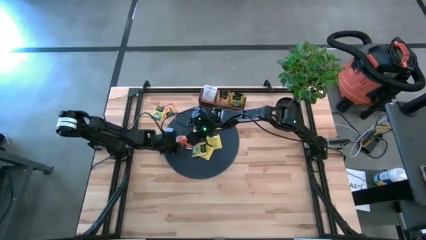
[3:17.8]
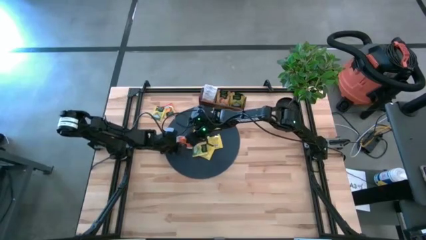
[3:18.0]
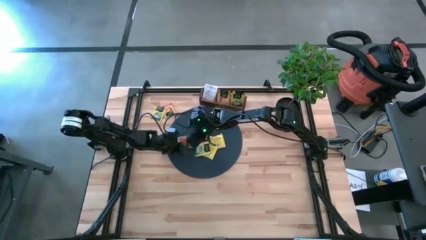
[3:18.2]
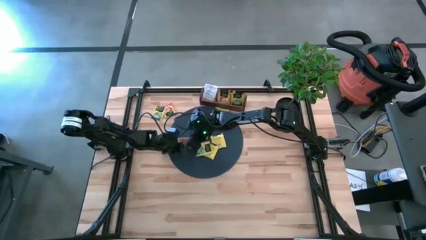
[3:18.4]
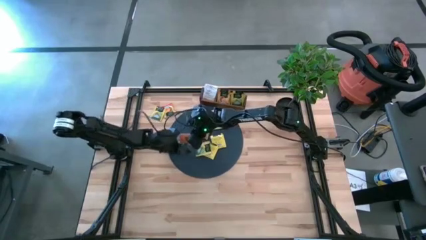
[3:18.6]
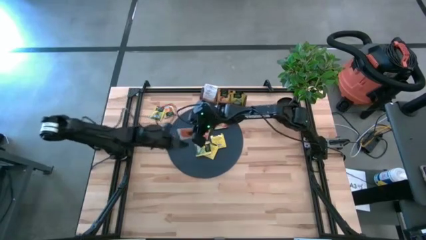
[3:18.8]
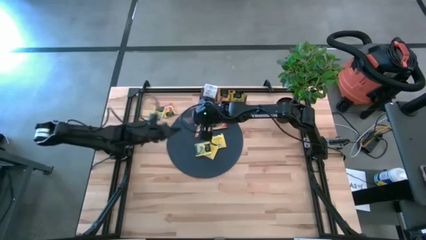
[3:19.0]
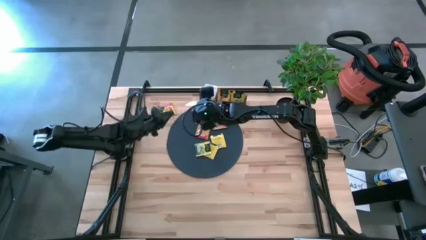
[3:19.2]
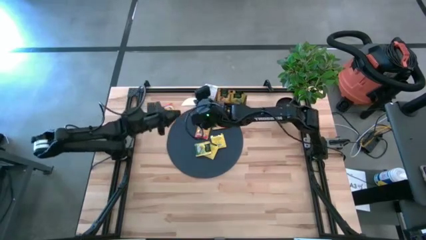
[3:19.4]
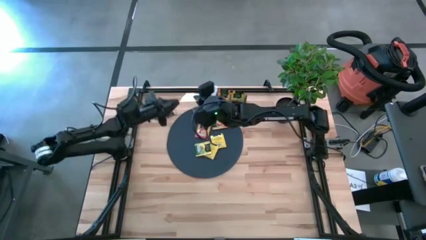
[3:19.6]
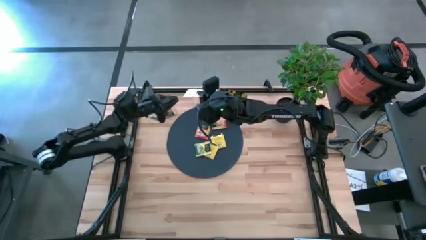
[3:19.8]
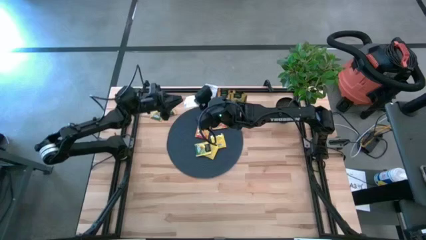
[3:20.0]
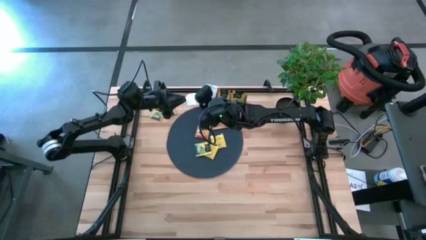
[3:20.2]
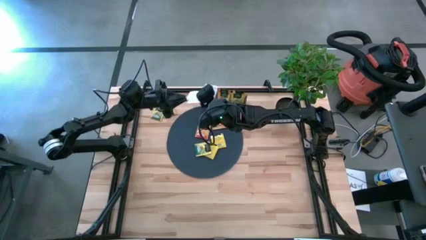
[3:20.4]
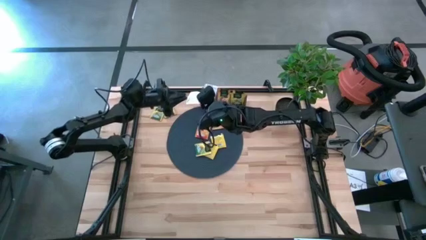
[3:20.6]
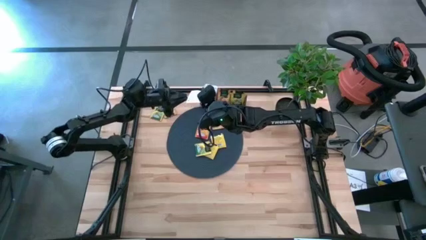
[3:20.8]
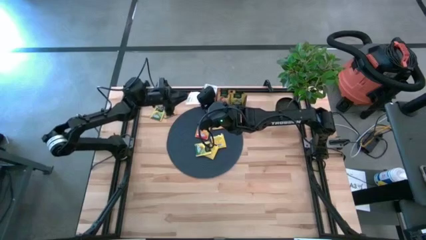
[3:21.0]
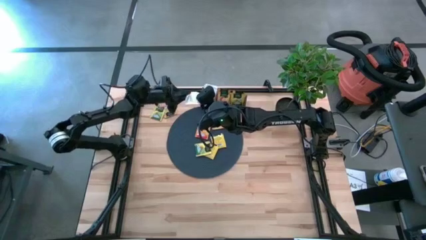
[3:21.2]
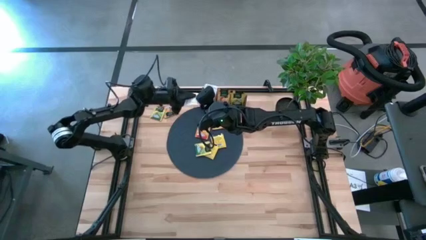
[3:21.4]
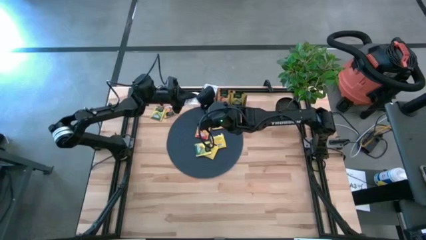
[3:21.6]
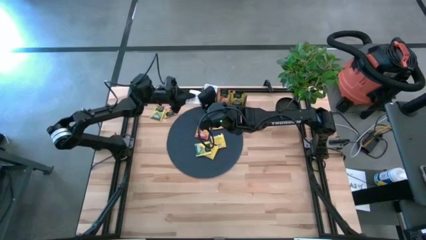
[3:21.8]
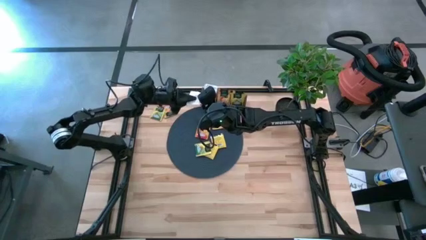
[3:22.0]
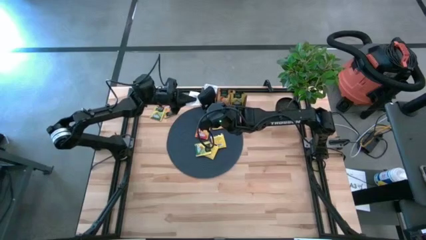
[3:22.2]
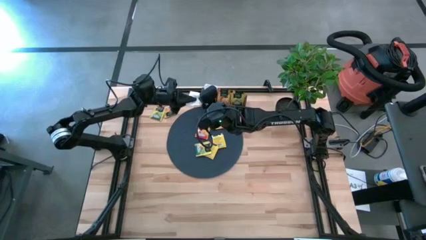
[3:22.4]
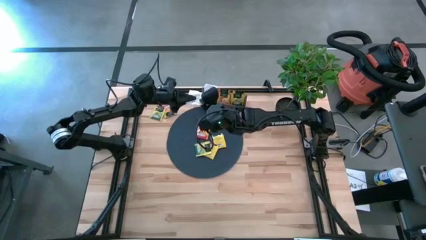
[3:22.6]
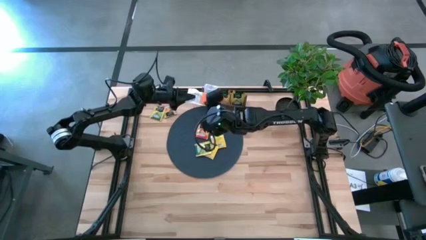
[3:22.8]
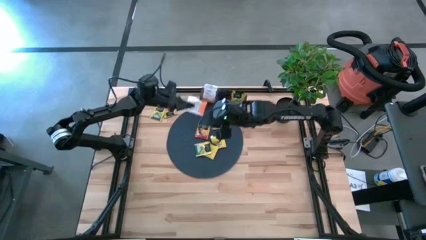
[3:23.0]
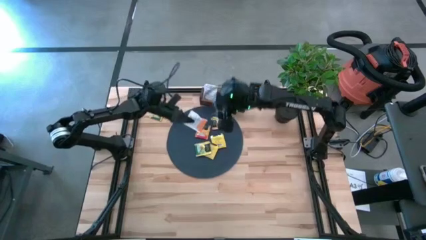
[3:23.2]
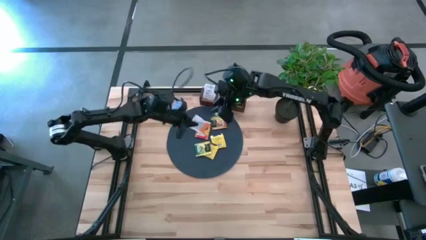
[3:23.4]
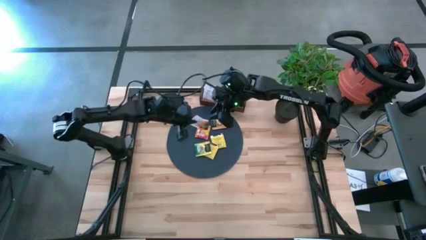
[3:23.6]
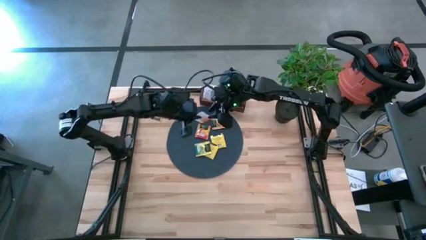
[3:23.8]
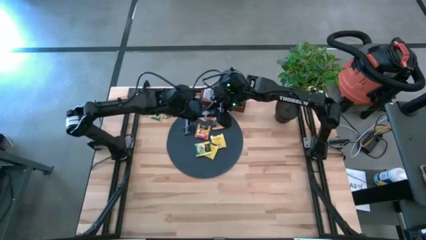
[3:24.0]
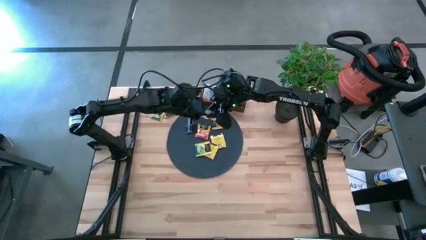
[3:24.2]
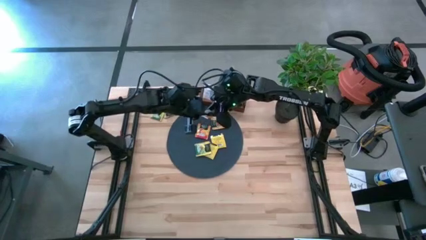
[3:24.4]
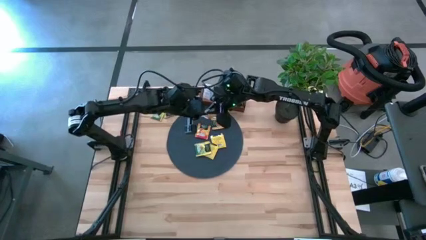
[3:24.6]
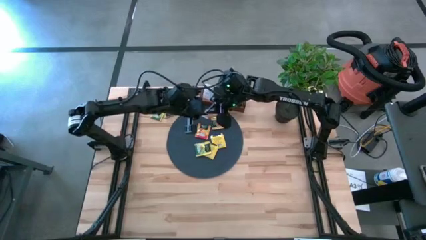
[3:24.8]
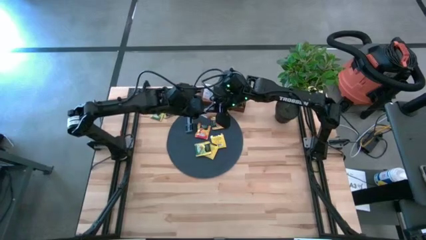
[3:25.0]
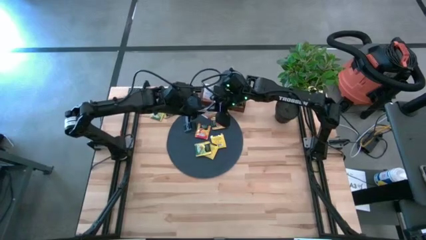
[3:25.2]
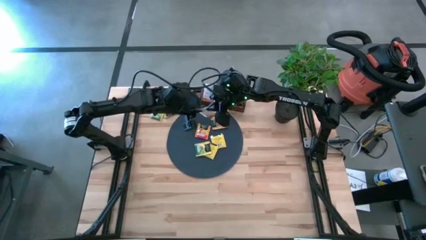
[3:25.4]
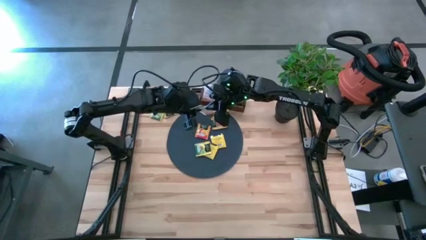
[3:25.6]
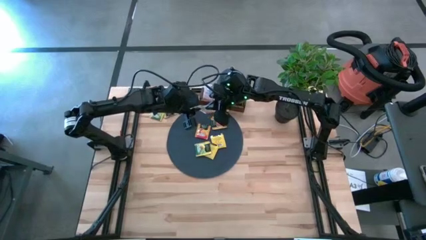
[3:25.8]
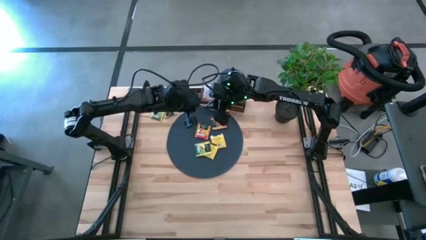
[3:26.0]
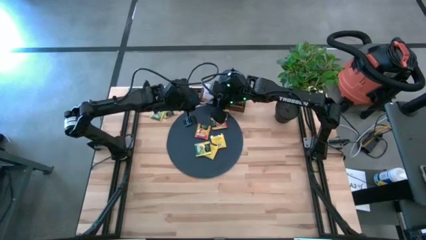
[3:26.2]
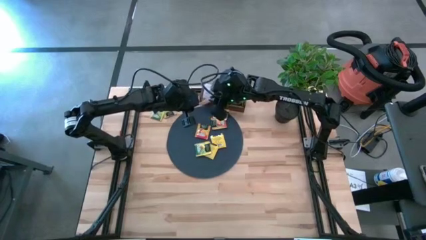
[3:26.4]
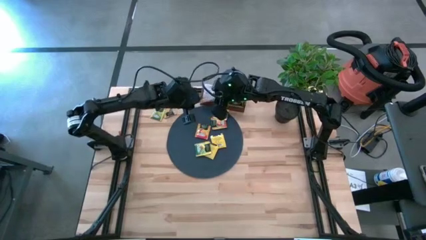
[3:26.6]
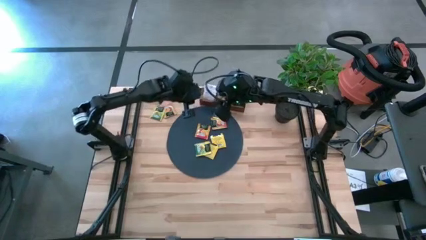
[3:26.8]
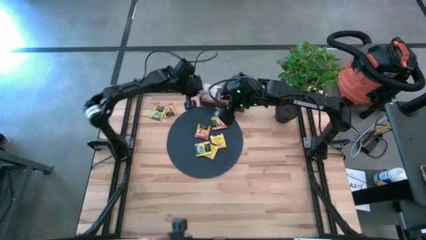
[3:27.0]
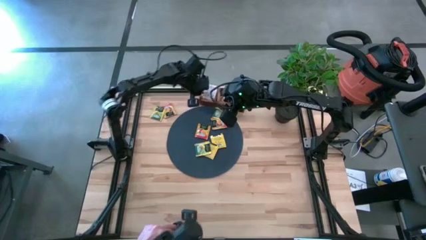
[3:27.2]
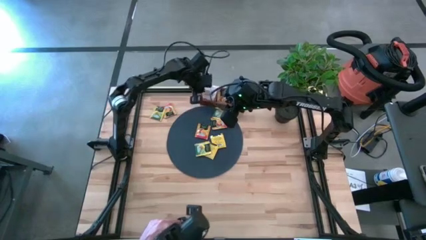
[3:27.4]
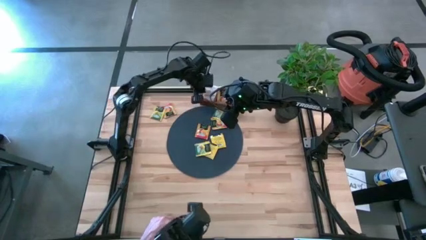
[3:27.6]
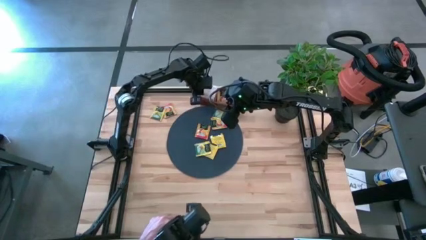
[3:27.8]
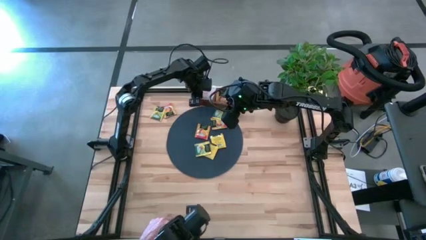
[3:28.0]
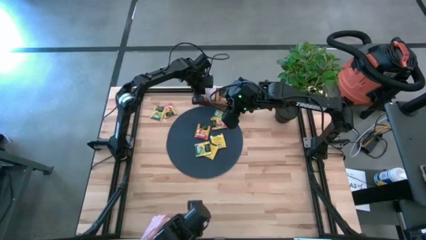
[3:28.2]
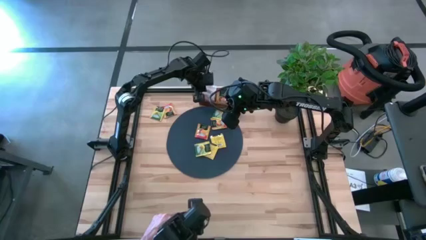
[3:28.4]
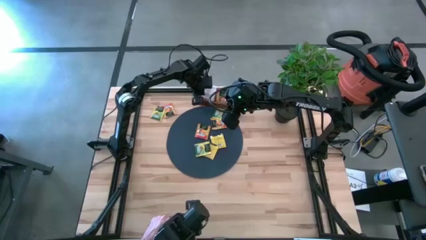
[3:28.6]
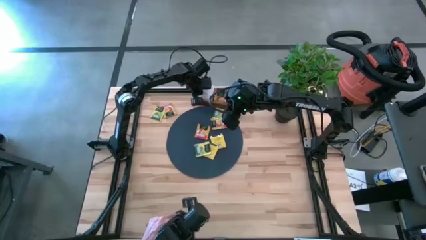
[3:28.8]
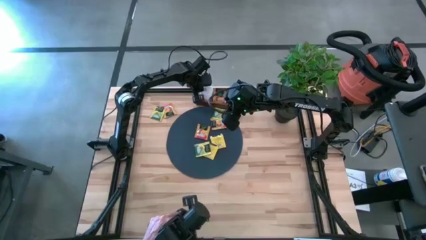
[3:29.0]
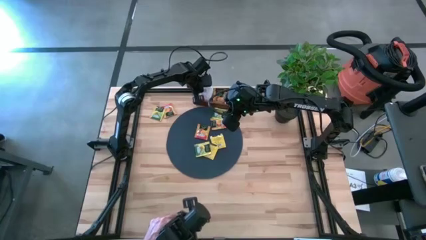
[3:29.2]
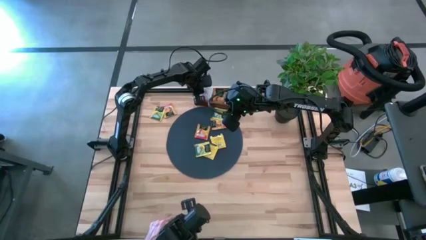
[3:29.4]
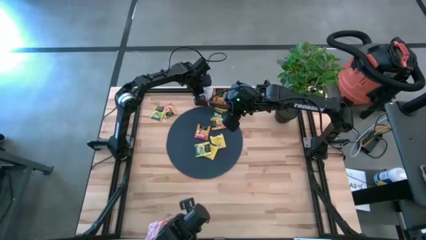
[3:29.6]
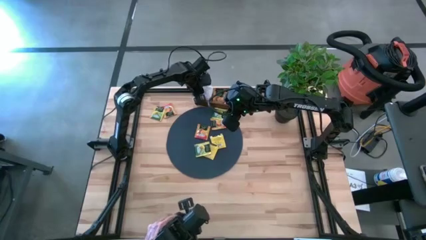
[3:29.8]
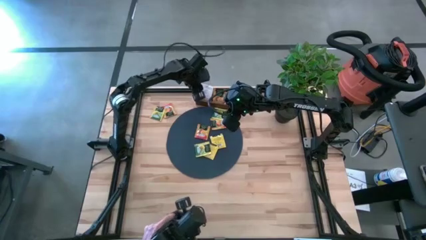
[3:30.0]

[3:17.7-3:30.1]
Task: Pick & Place Tea
Put the orange tea bag into the left section of the wooden organizer

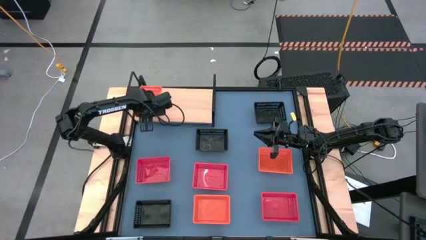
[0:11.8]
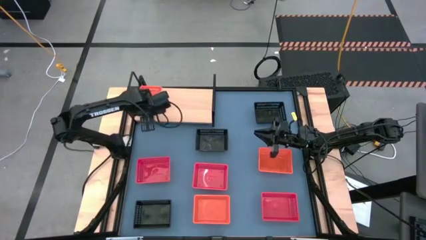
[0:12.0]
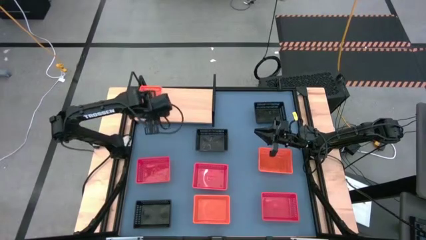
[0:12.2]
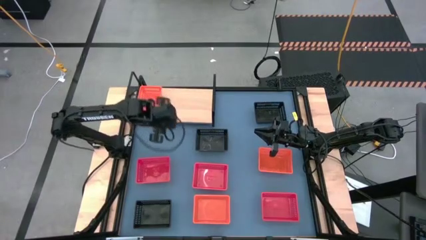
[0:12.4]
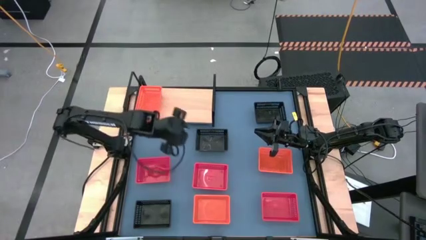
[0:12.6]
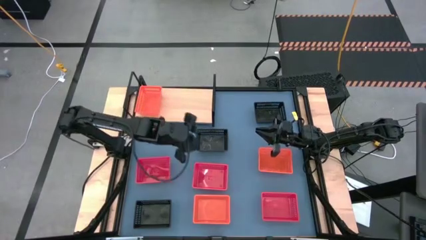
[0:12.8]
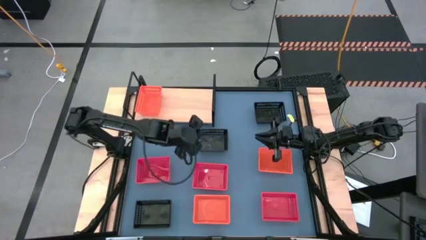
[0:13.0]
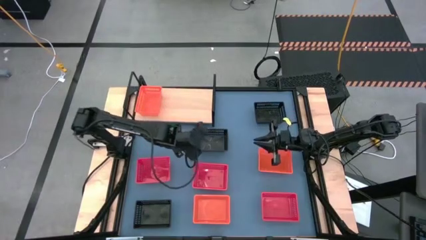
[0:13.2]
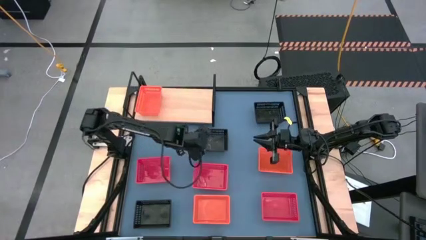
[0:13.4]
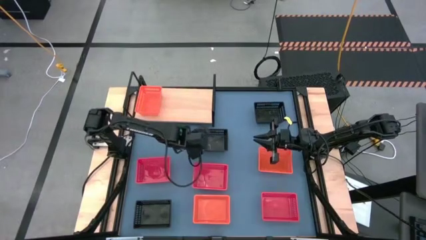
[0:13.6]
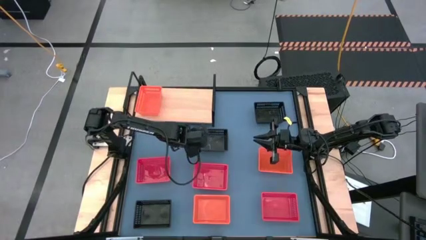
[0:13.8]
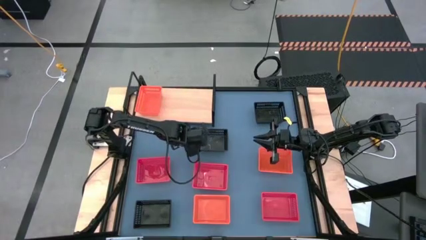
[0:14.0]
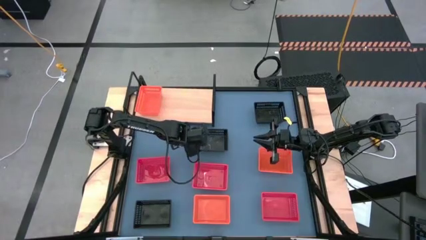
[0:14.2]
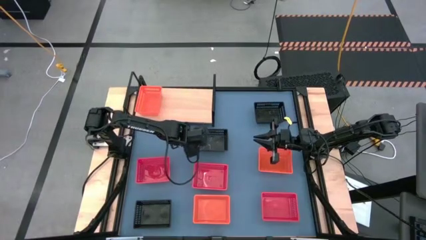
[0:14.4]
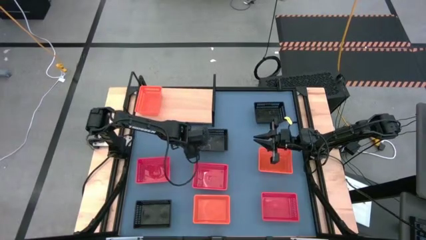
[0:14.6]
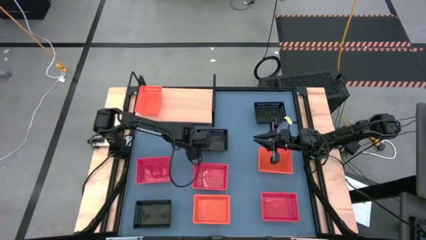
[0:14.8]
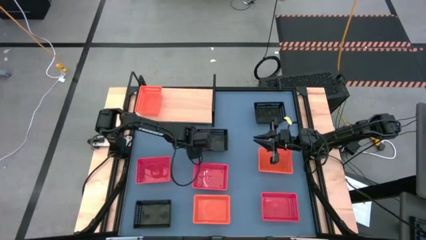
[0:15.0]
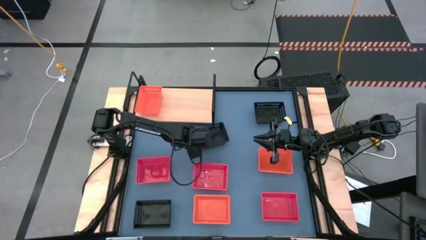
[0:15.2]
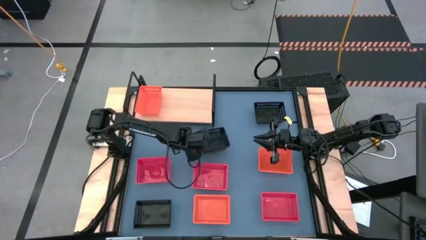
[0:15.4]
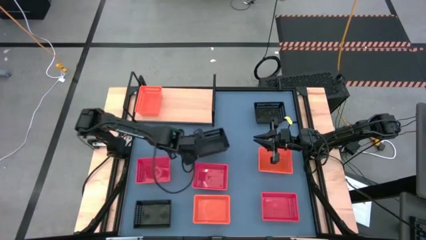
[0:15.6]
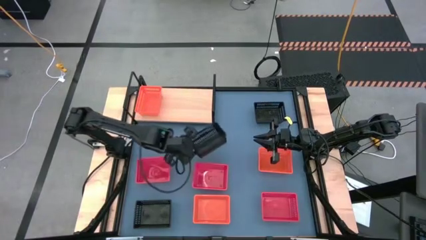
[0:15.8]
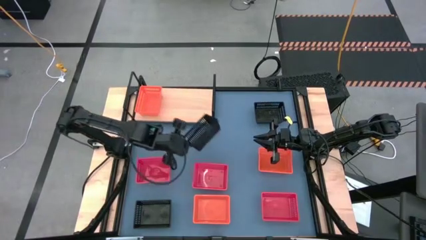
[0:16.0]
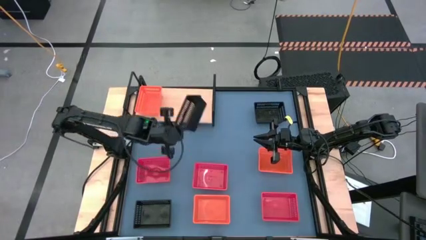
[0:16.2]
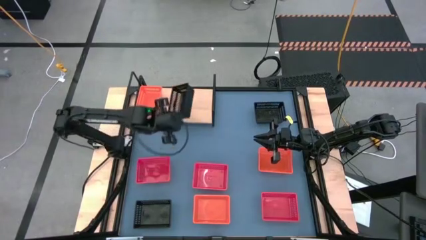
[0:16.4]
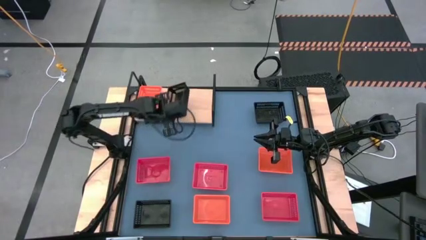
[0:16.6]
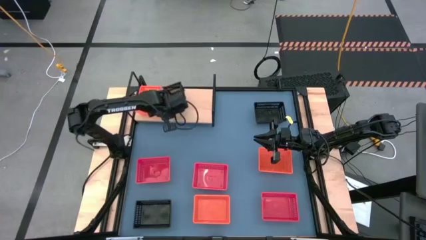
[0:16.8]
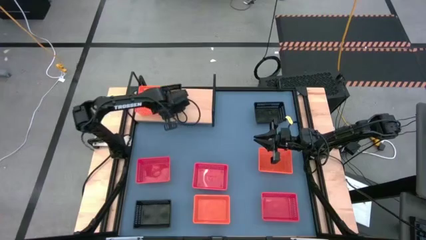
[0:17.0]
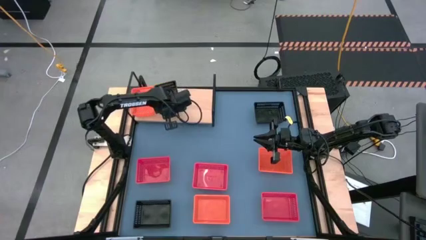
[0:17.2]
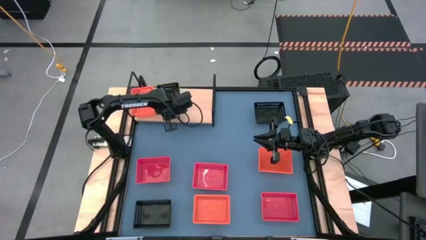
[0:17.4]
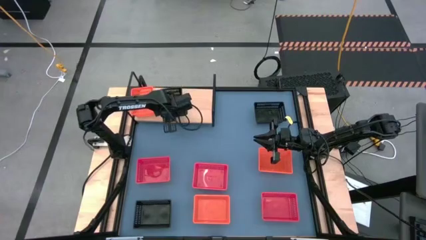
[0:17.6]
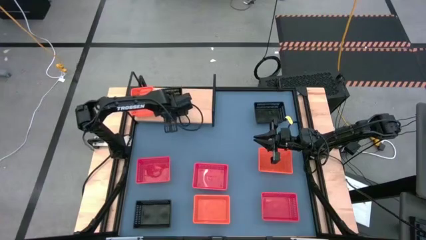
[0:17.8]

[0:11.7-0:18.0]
Task: Stack baskets on shelf by color
Put the middle black bin on the shelf
